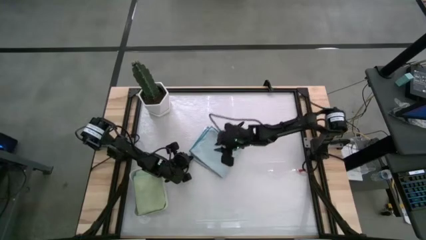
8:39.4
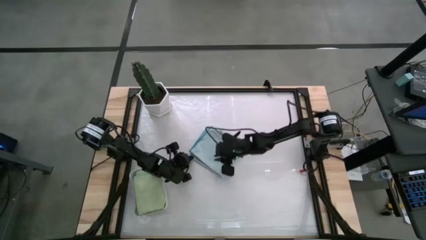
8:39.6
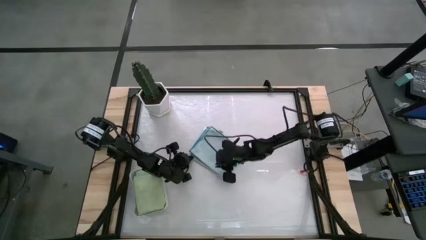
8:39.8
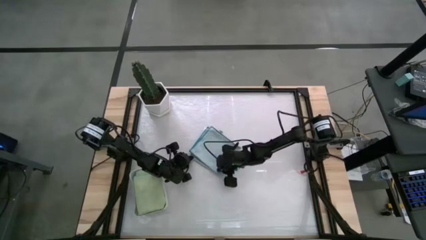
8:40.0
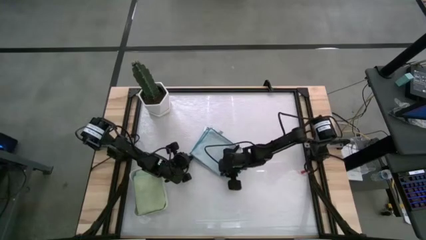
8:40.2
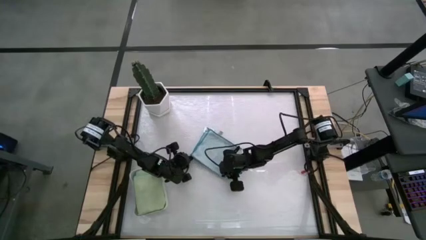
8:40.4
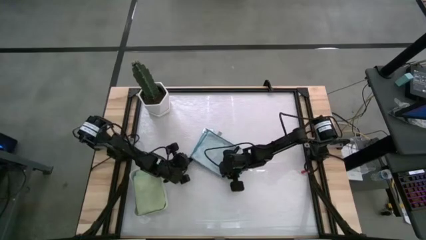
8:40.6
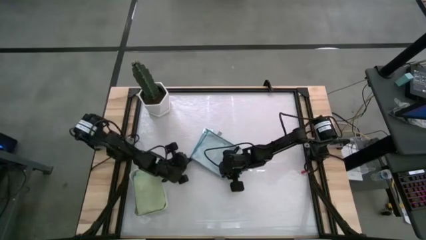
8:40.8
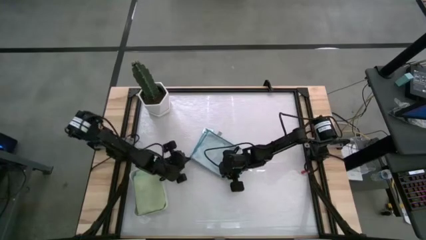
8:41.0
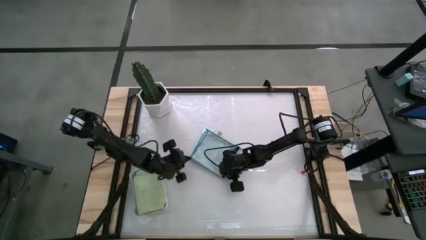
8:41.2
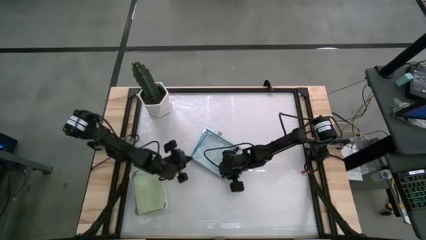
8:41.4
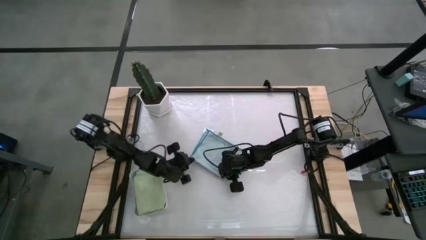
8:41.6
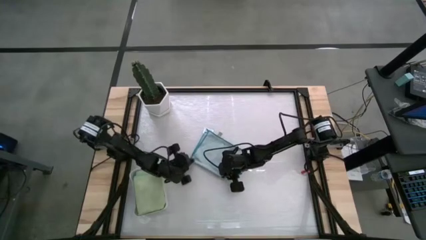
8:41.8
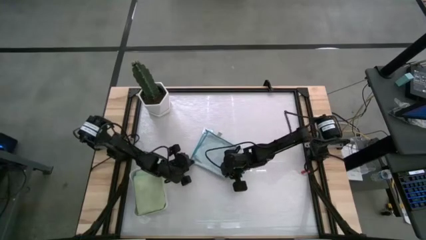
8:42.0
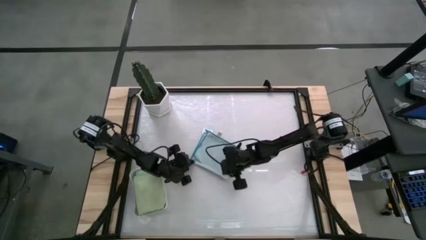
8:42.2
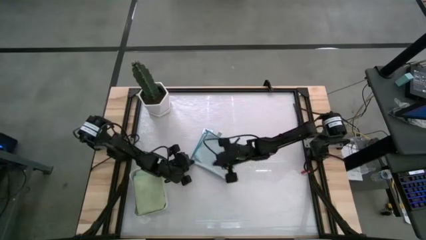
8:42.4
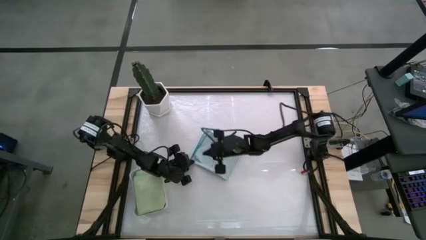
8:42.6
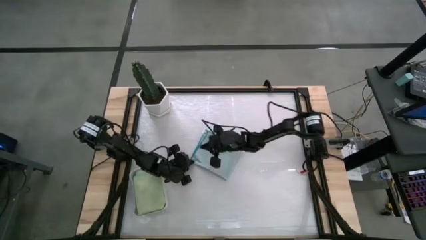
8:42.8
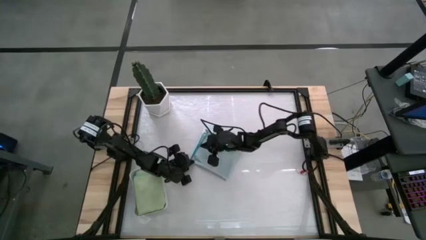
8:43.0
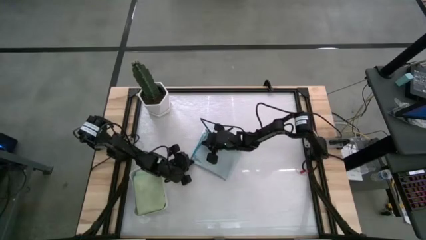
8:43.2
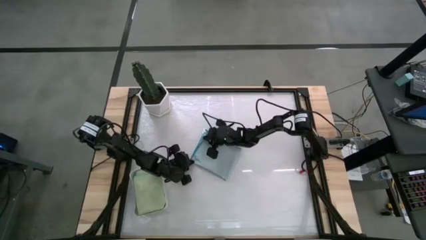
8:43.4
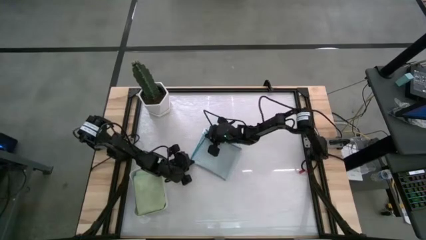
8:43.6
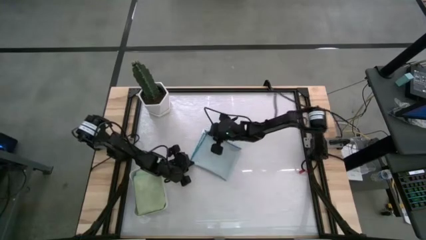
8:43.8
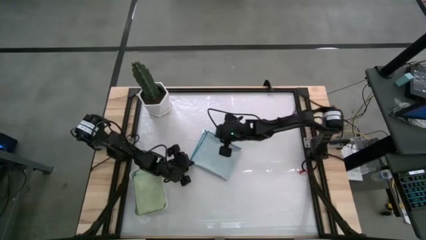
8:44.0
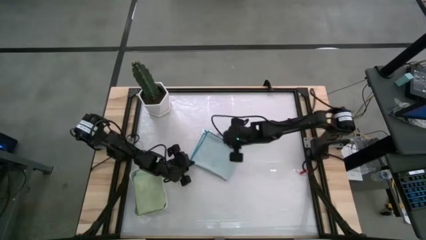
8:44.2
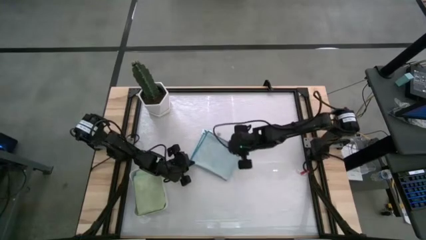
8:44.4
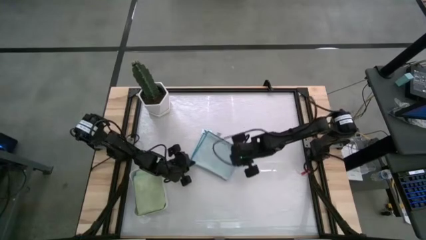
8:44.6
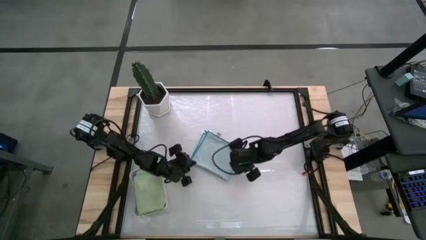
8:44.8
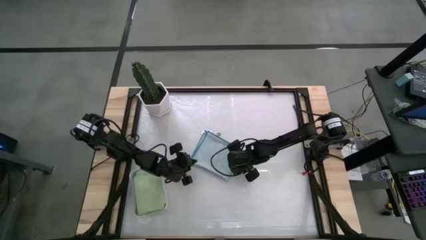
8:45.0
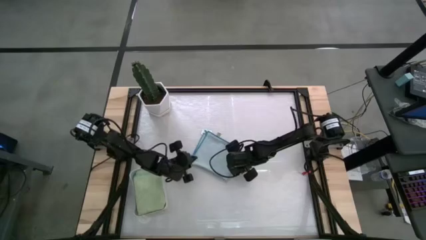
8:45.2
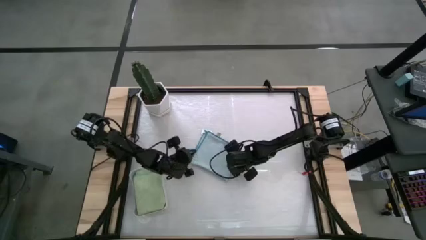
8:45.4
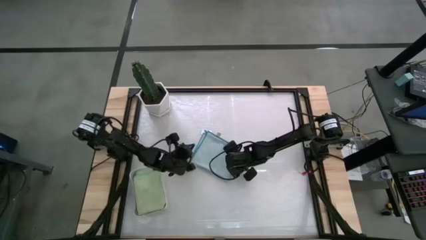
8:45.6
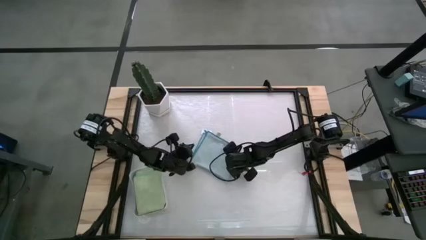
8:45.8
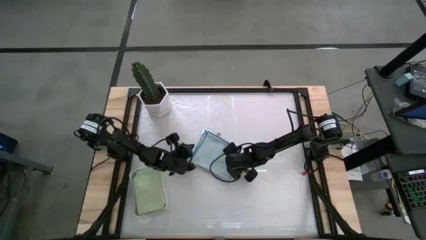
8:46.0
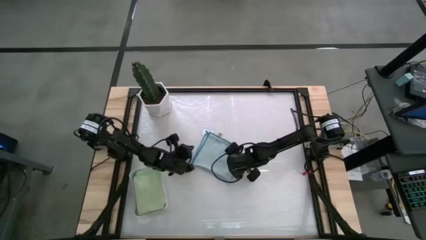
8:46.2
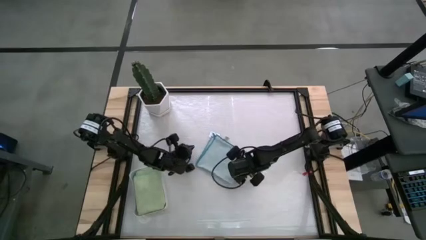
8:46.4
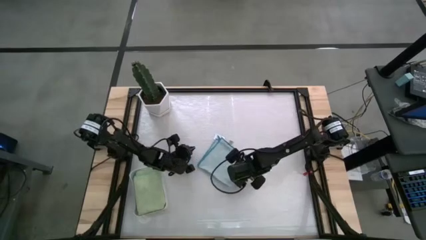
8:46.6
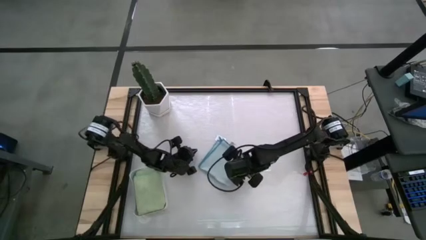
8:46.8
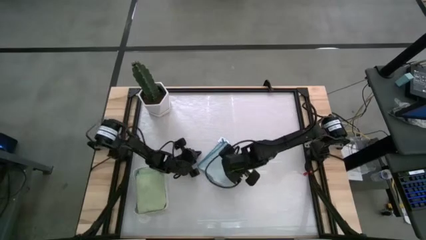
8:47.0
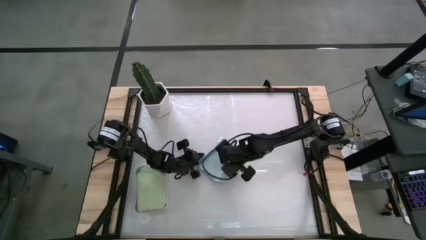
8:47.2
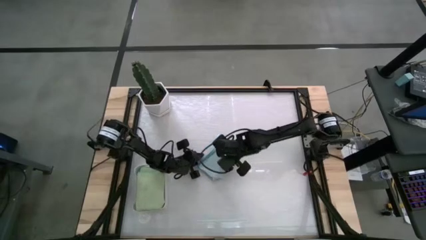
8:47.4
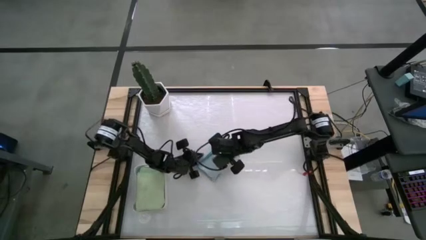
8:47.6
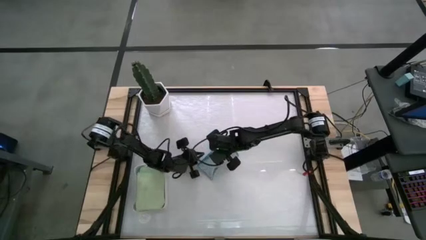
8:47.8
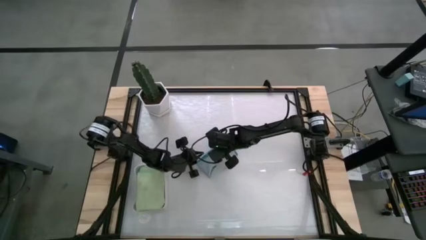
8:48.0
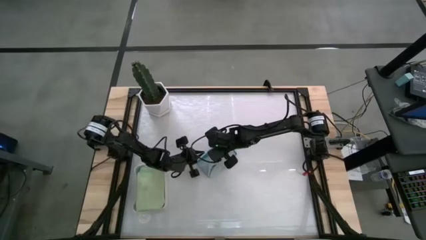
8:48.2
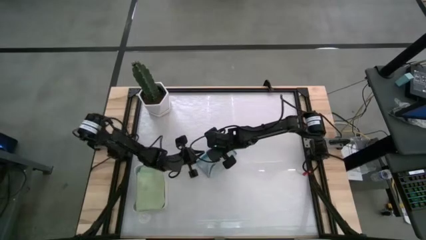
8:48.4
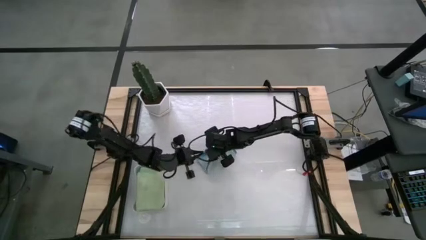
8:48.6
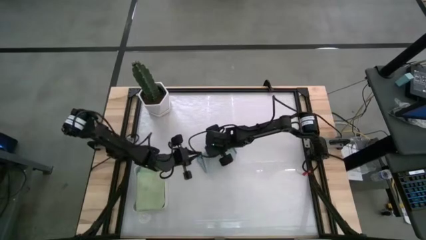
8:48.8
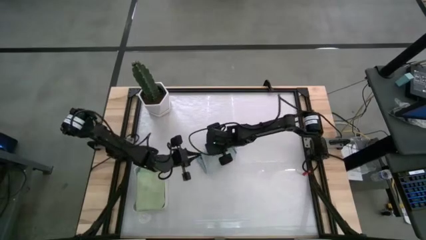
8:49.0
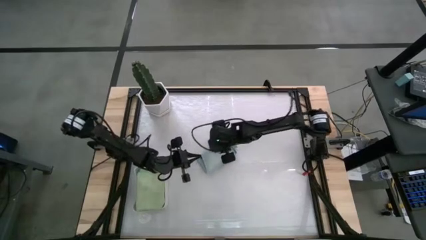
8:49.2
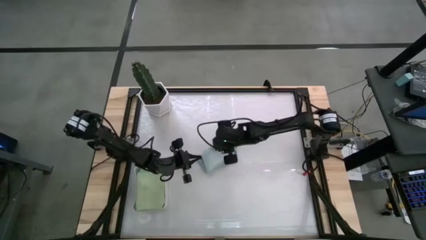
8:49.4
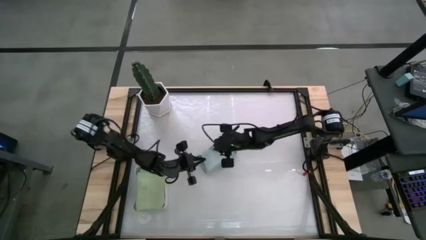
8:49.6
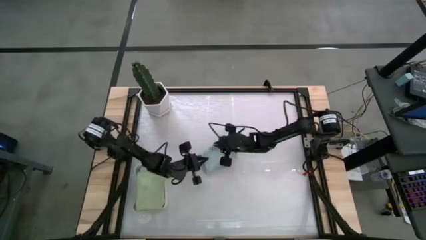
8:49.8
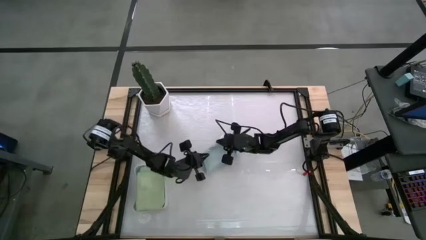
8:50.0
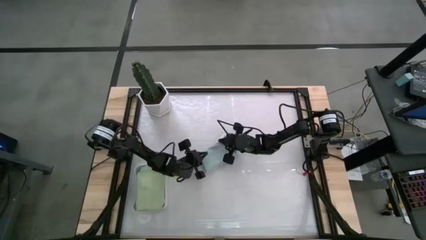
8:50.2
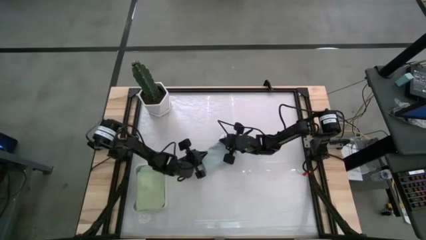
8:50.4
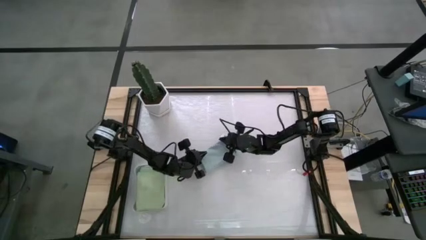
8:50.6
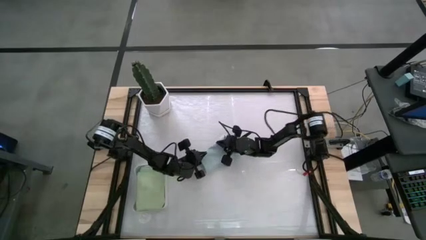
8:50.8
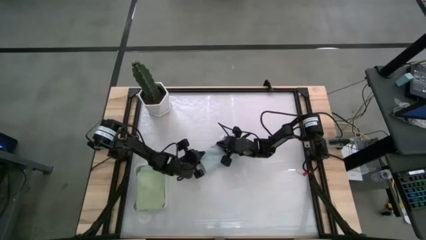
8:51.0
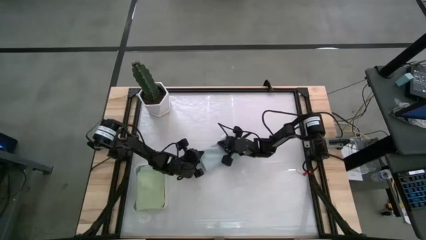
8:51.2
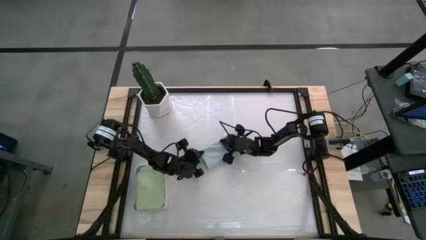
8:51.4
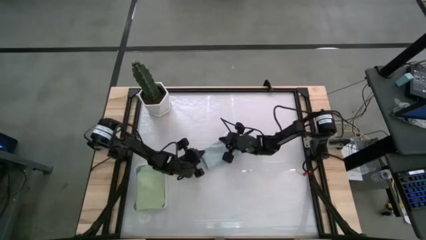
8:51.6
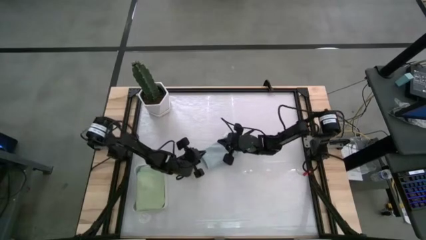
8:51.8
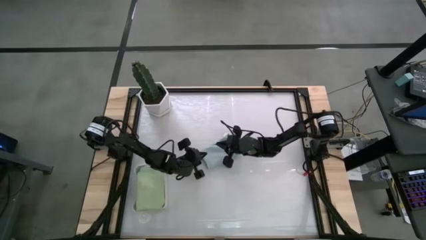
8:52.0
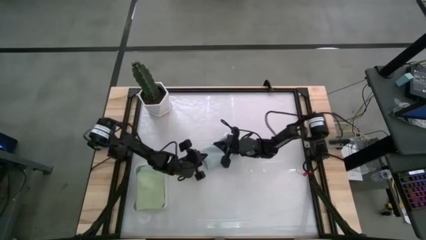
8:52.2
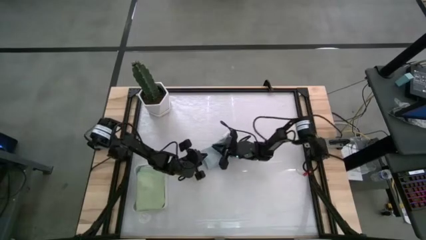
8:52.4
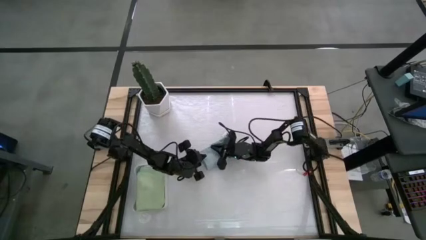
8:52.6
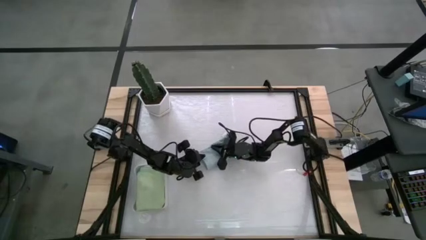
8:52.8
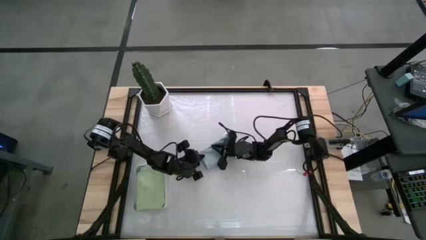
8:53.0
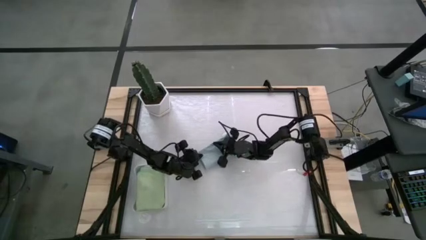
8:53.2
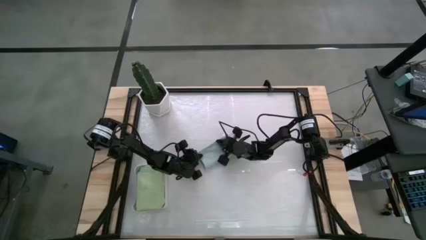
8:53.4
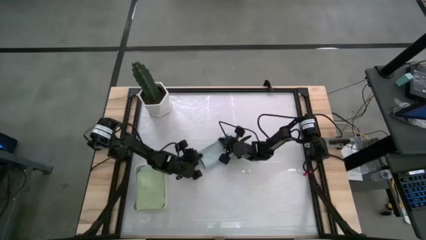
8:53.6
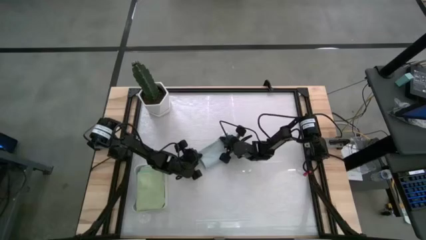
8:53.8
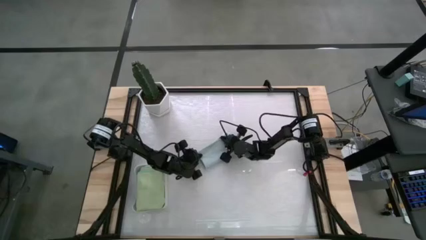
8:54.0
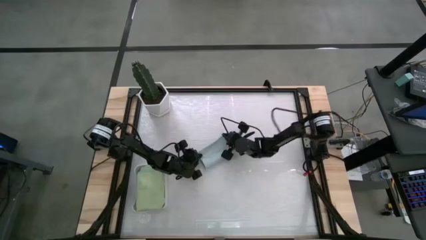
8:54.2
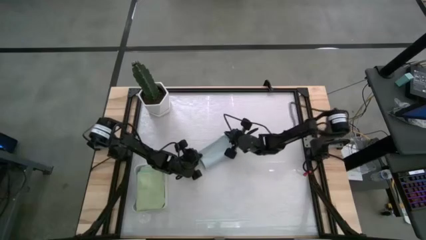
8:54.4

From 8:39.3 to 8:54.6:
Task: Fold microfiber towels
Fold the light blue microfiber towel
